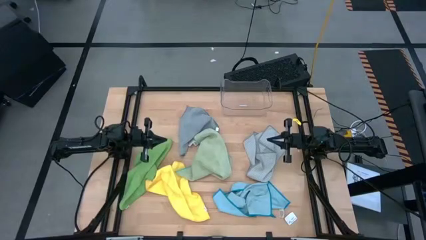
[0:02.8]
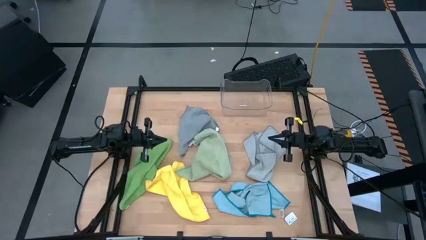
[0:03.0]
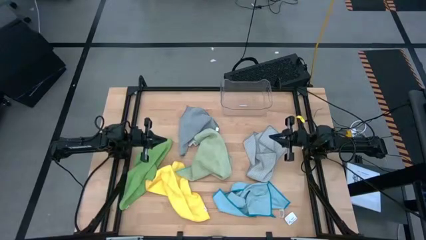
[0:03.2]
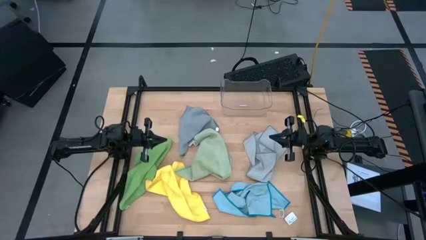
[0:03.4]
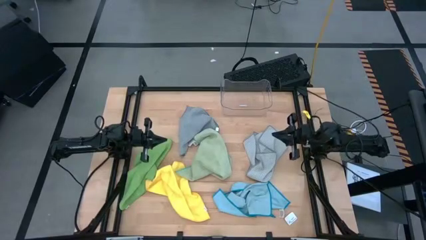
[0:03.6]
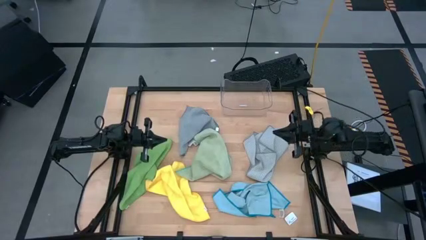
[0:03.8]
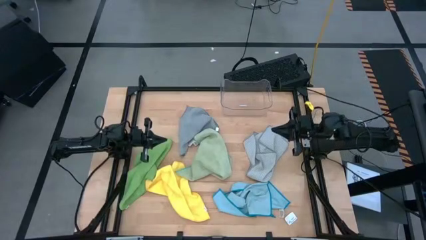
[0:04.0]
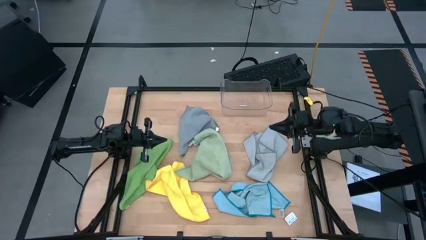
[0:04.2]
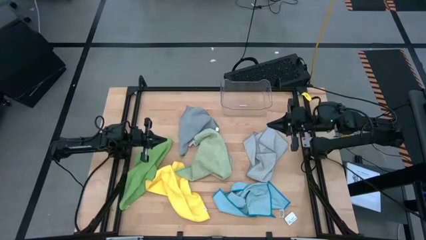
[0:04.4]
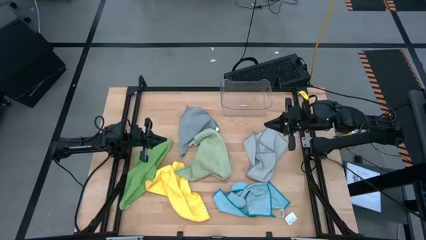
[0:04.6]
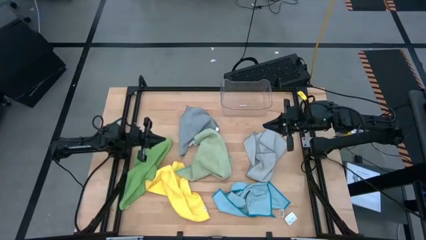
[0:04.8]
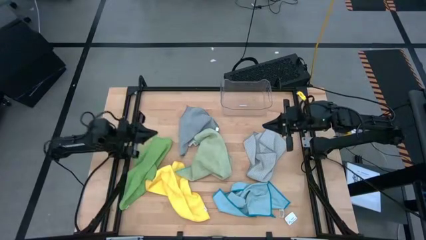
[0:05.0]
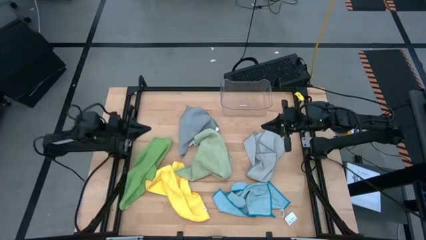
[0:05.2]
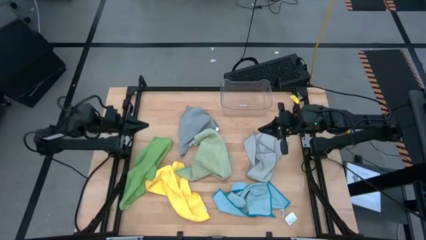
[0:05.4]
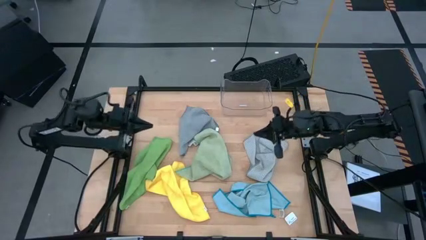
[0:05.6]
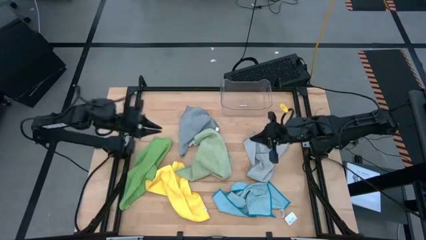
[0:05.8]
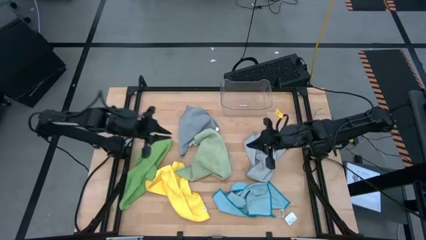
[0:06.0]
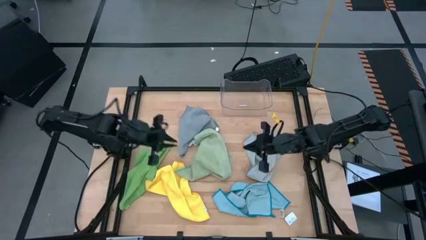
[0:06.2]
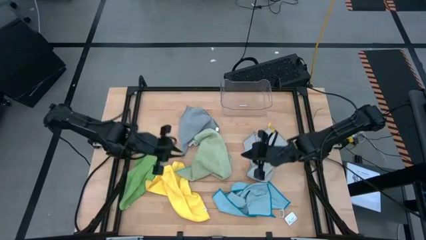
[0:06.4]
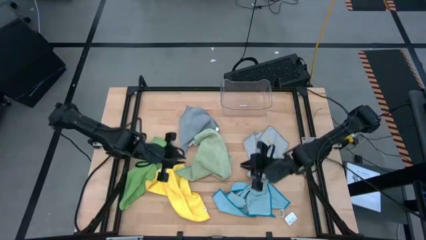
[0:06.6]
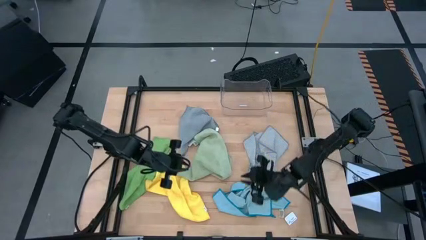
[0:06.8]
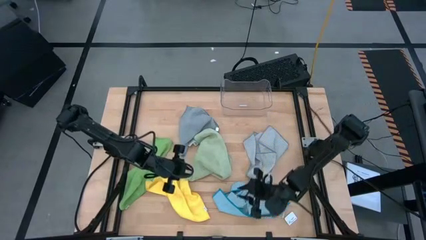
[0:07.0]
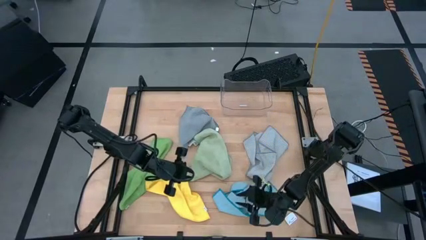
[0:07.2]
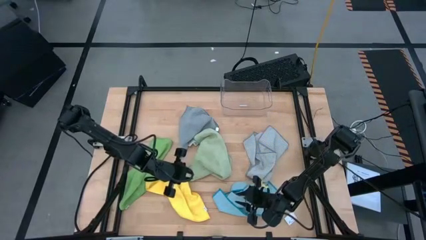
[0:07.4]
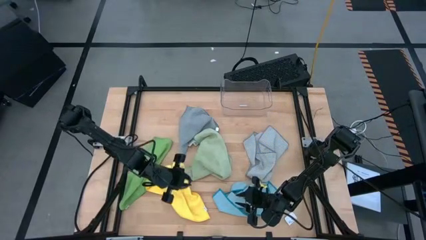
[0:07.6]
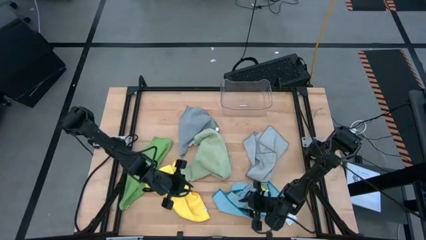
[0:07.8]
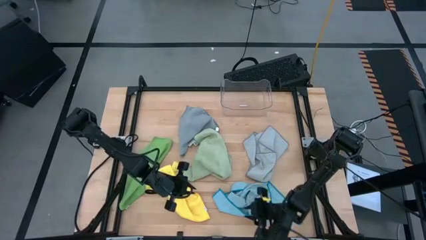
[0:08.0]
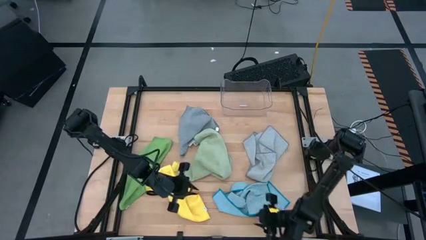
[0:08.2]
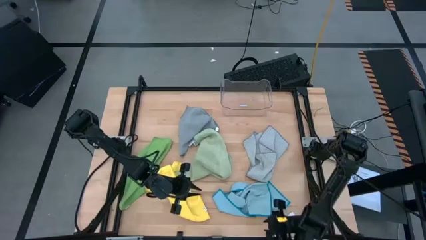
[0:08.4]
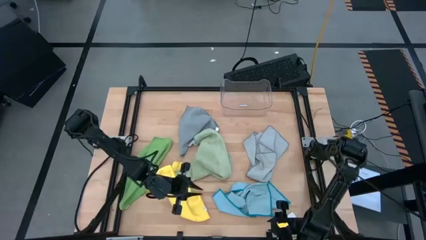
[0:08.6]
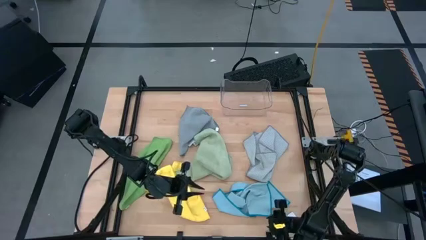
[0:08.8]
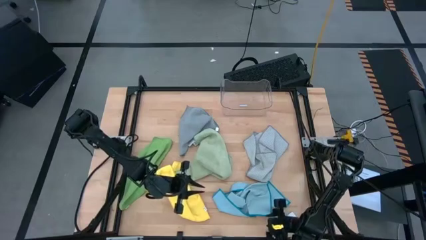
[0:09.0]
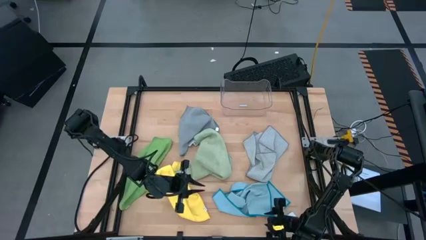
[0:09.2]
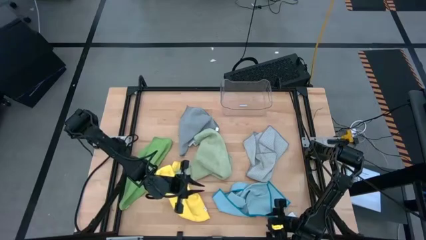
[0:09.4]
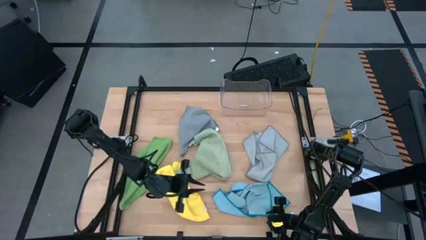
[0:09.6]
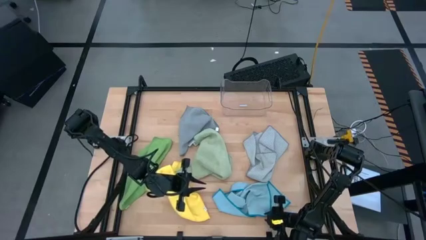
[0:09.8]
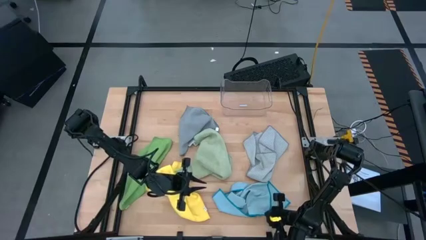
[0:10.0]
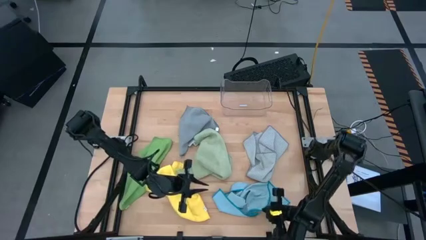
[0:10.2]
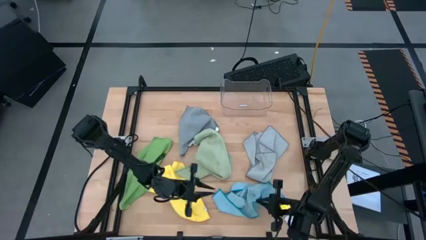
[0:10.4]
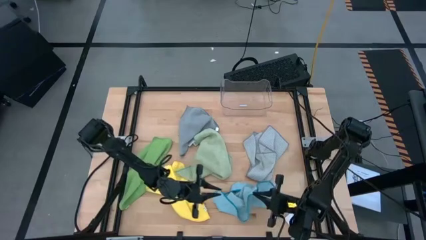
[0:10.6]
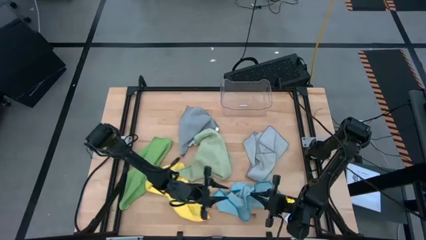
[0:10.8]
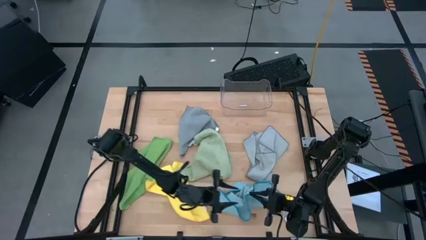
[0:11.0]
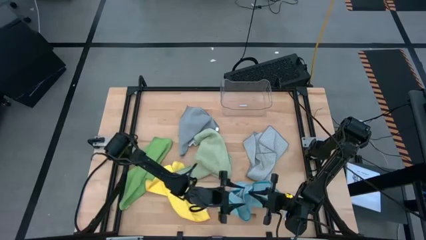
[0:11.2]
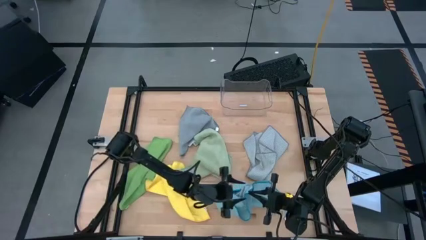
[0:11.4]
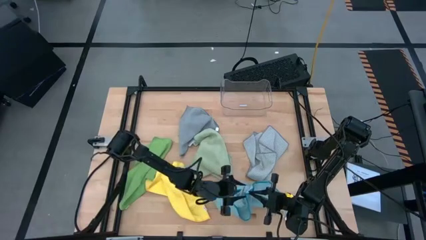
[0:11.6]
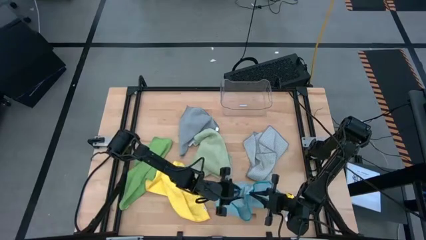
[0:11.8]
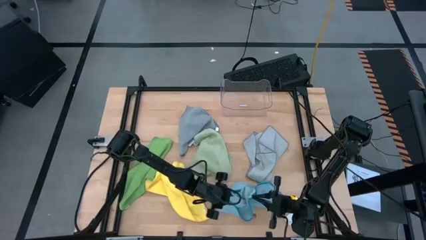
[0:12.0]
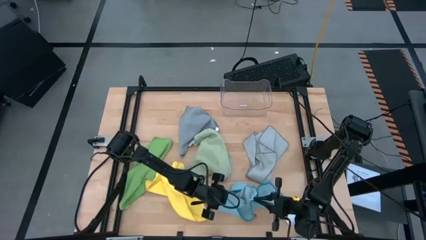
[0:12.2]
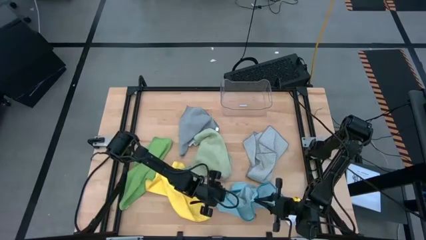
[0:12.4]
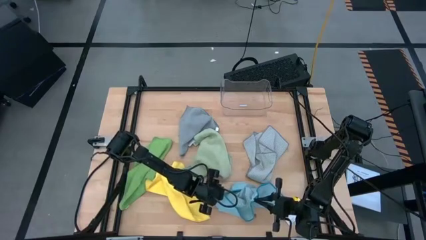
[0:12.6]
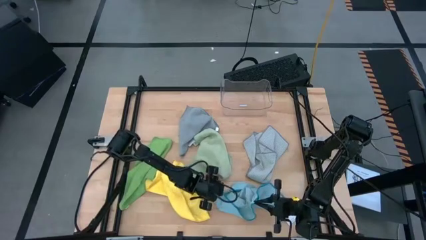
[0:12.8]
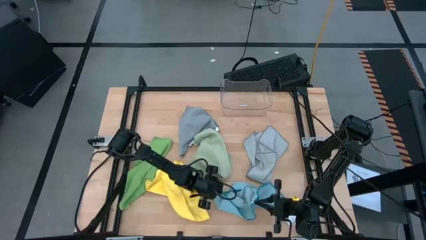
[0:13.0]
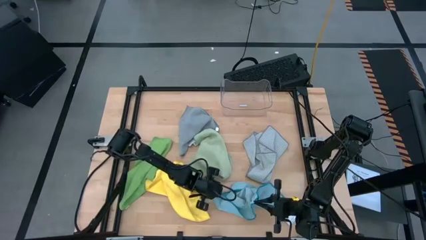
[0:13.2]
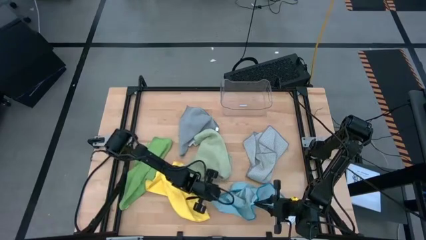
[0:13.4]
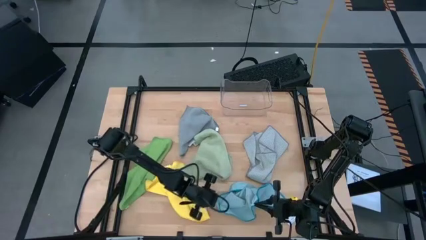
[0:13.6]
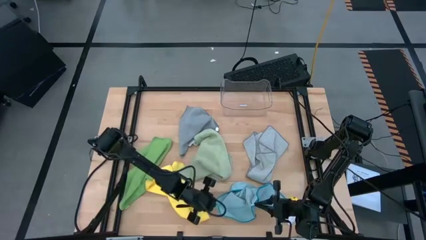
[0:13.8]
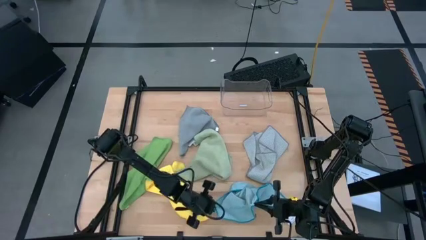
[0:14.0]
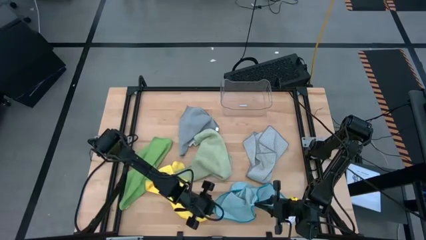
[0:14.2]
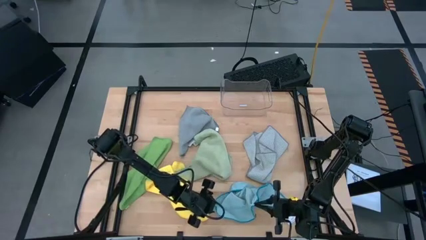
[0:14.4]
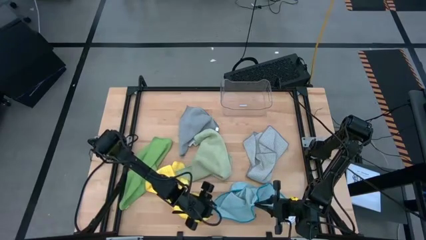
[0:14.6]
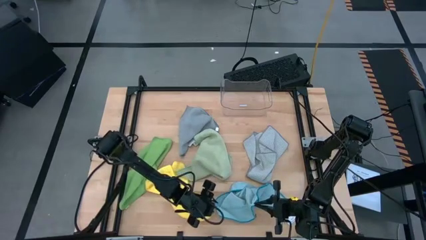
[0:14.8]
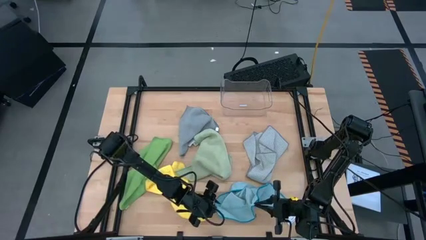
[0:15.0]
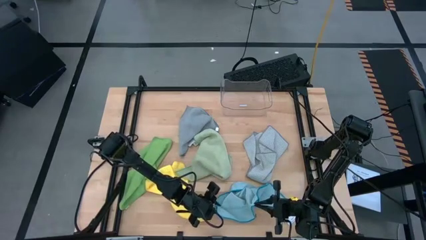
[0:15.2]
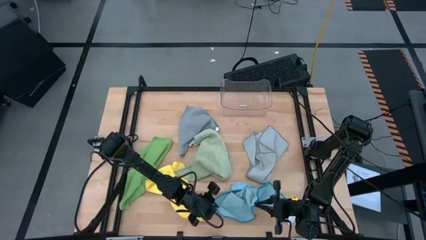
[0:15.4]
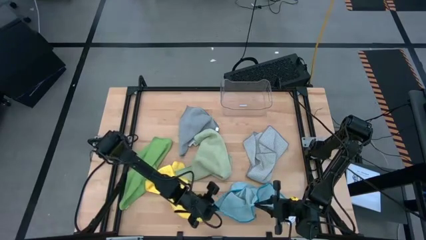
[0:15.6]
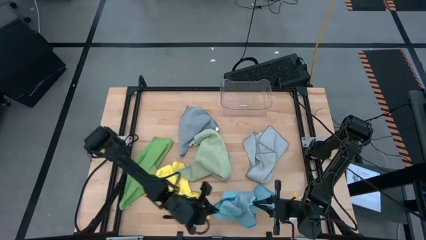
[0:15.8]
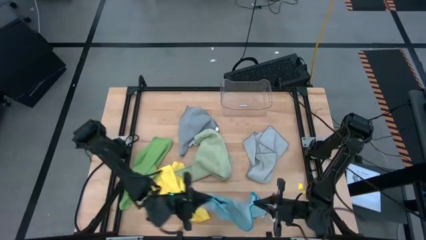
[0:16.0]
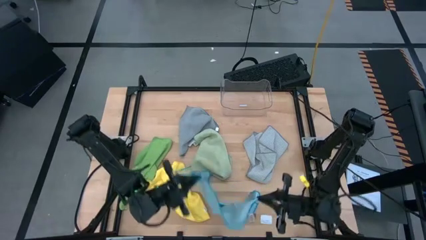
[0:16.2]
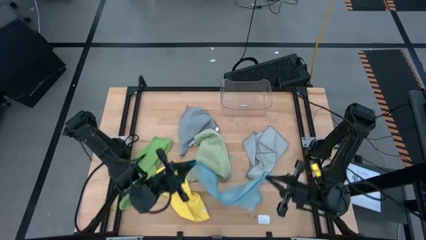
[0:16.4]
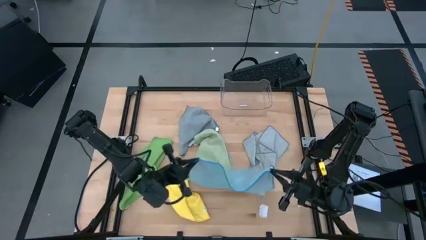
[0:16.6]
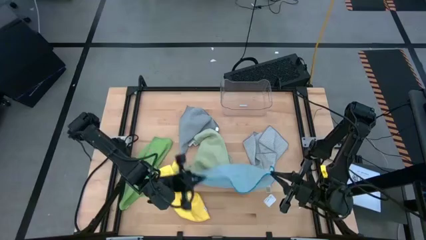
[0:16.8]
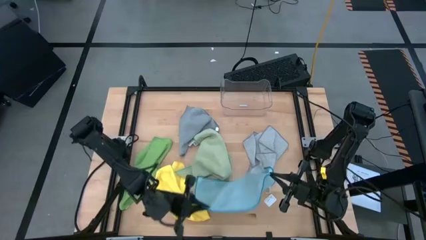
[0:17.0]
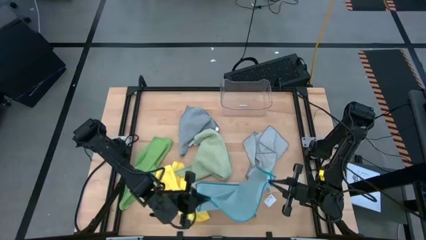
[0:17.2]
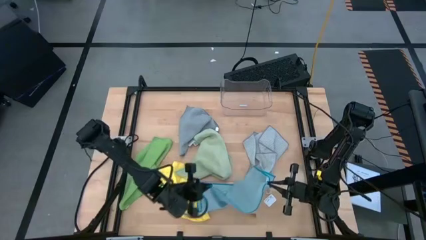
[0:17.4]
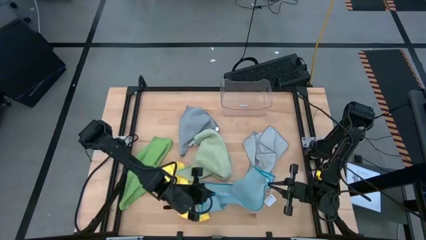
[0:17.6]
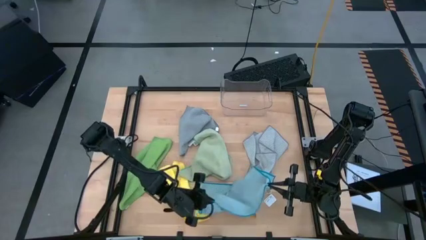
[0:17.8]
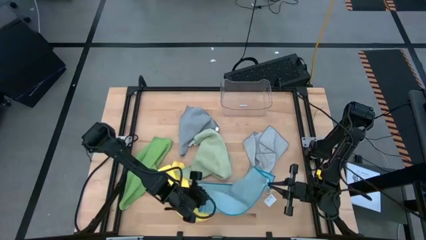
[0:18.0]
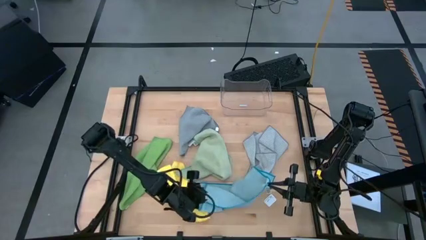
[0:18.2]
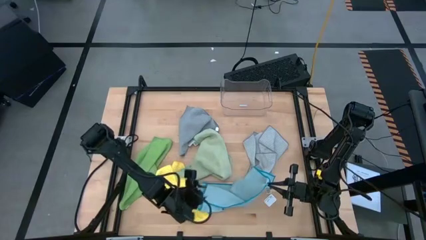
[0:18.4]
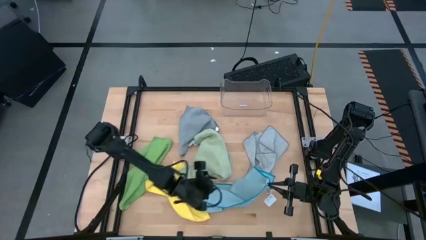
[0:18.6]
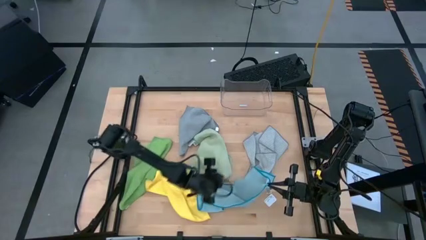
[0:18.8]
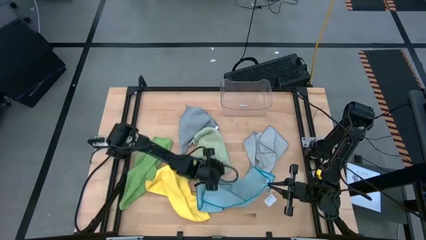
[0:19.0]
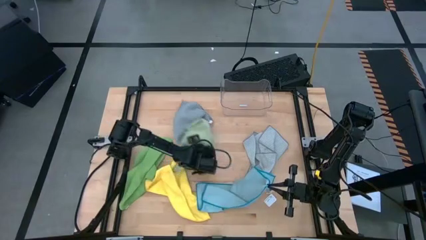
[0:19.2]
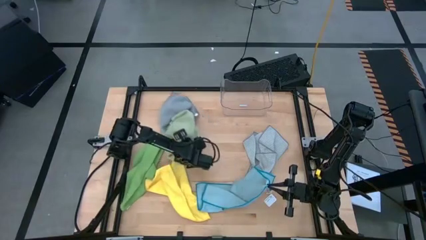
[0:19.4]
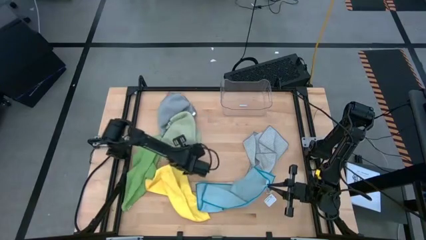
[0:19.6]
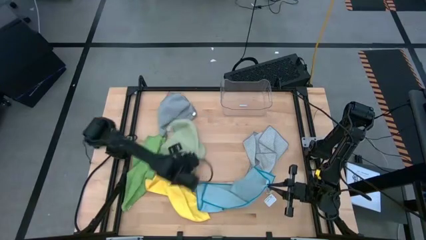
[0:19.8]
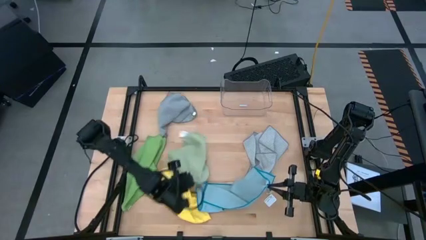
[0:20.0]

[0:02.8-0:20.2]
Task: Fold microfiber towels
Fold the blue towel
